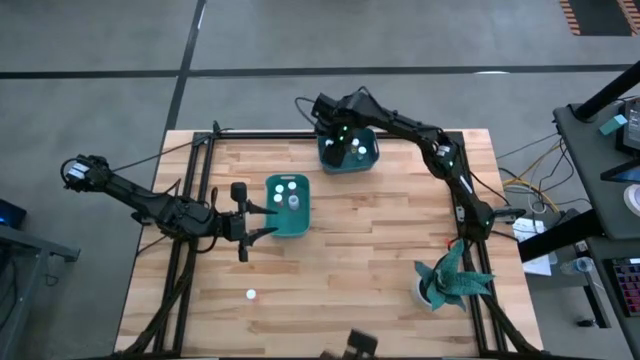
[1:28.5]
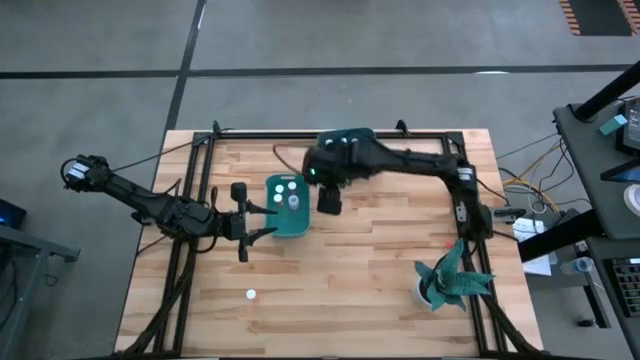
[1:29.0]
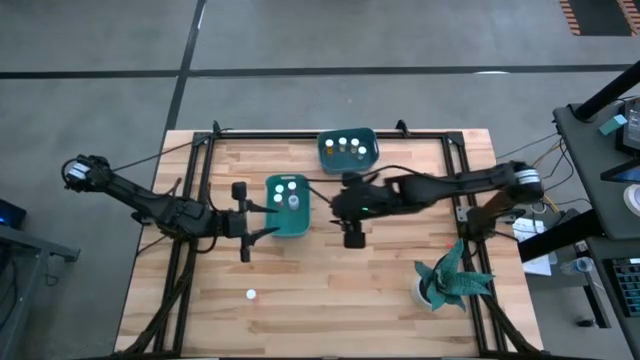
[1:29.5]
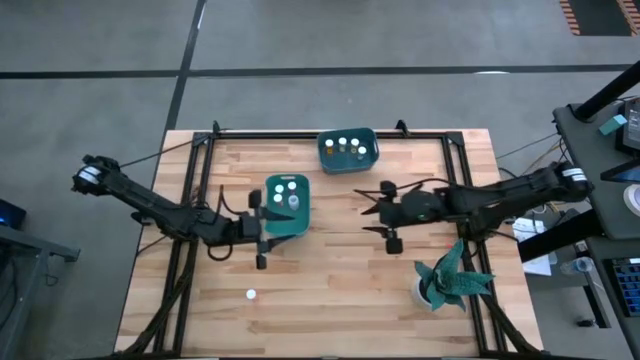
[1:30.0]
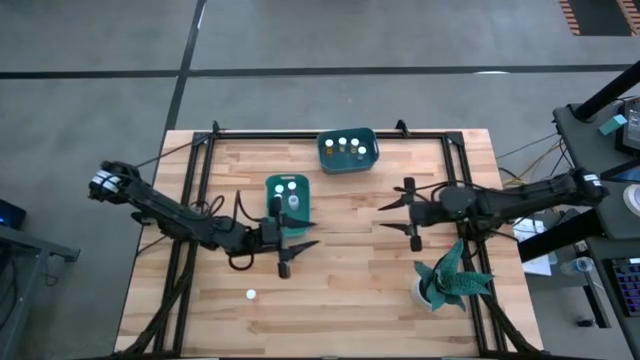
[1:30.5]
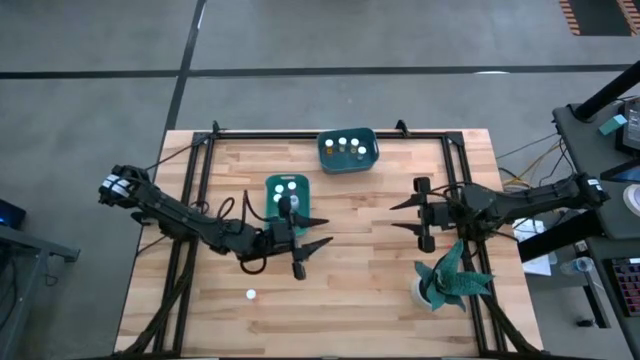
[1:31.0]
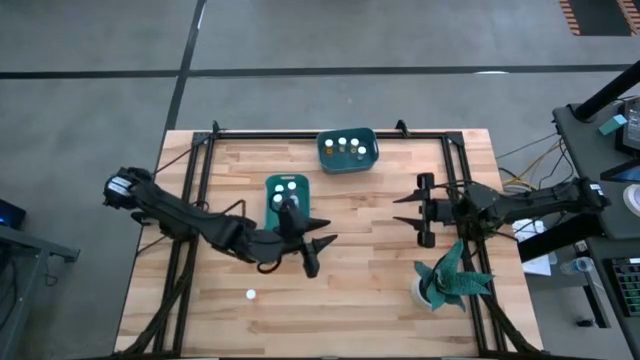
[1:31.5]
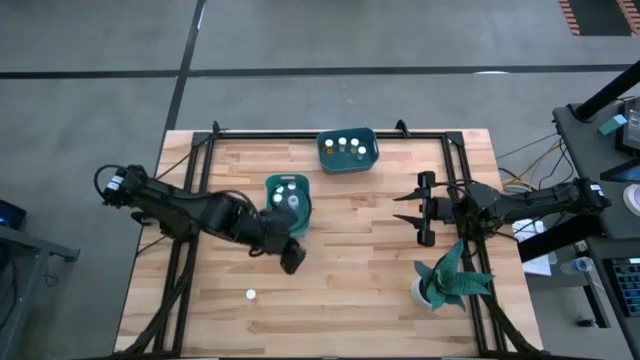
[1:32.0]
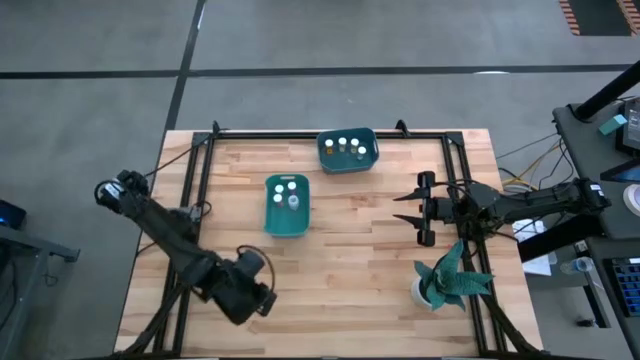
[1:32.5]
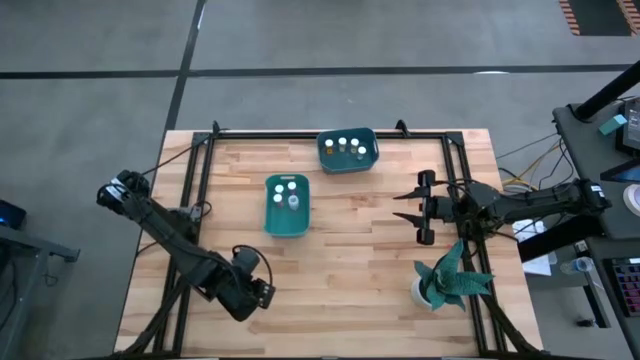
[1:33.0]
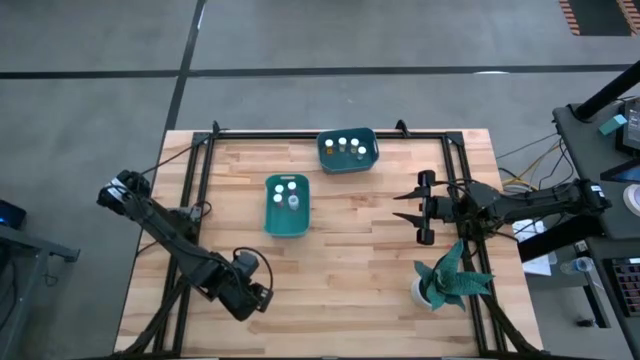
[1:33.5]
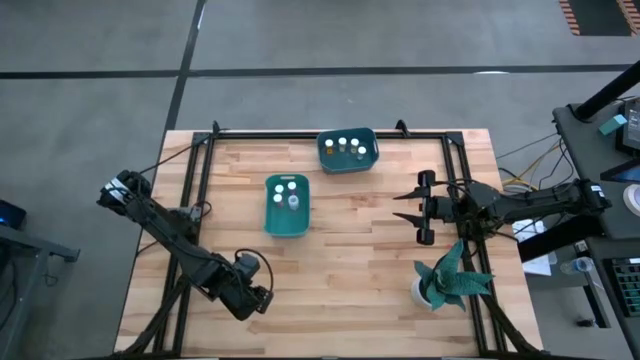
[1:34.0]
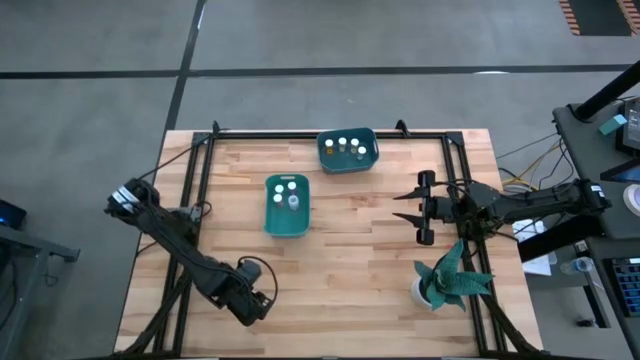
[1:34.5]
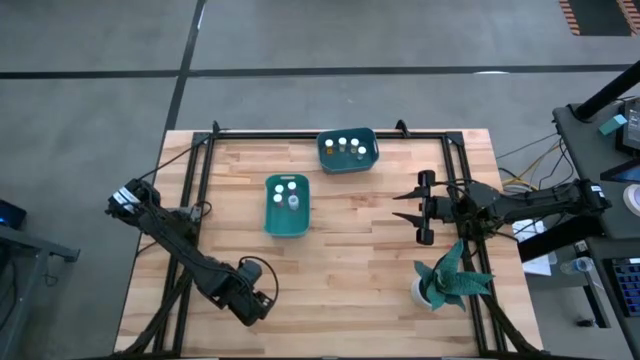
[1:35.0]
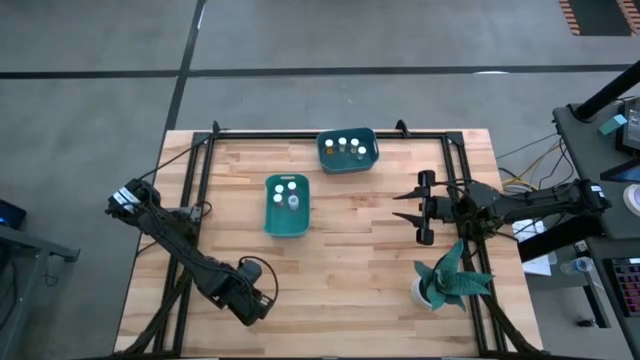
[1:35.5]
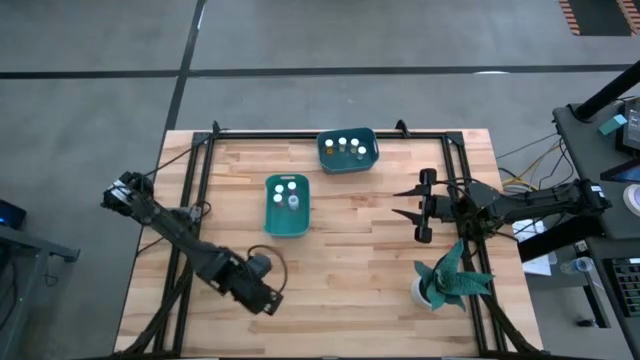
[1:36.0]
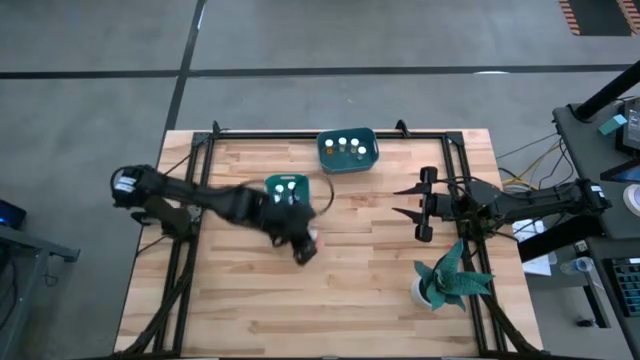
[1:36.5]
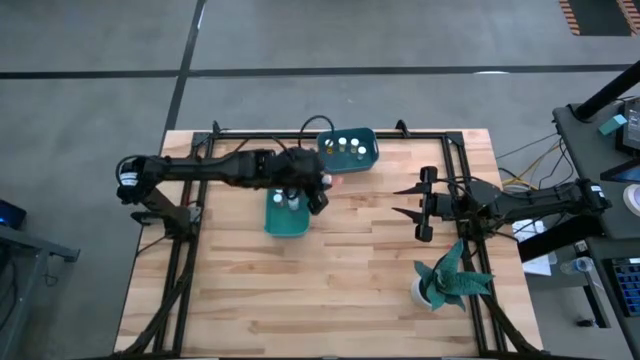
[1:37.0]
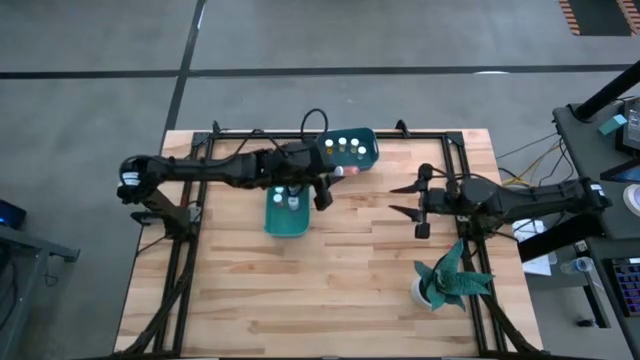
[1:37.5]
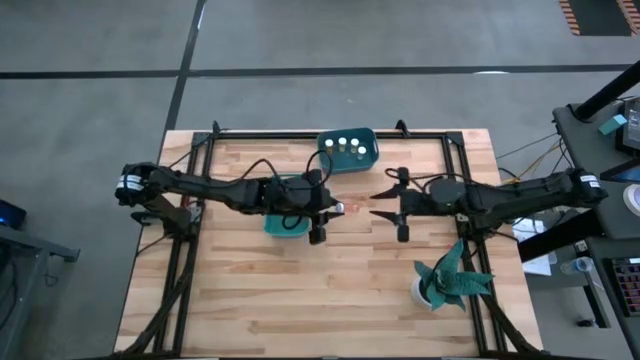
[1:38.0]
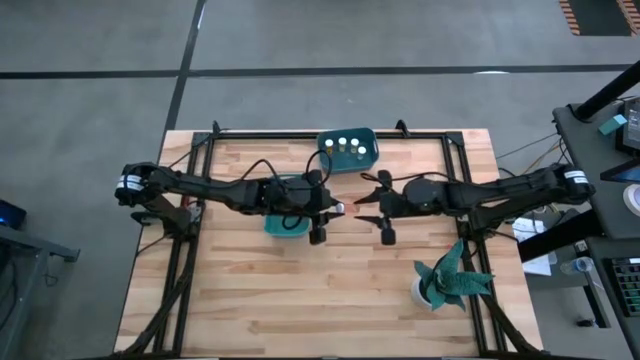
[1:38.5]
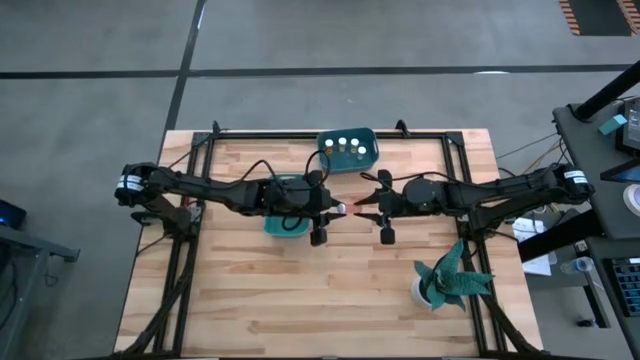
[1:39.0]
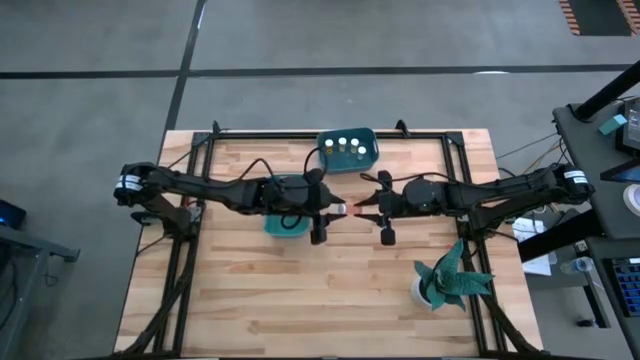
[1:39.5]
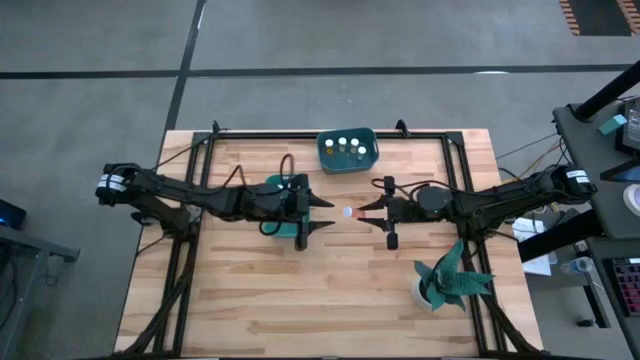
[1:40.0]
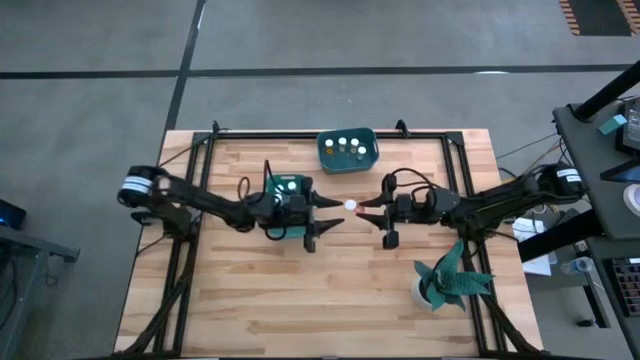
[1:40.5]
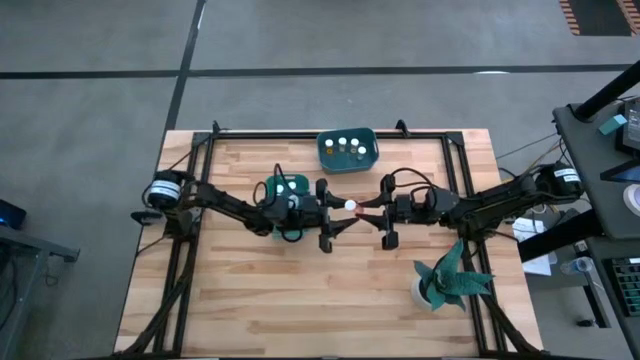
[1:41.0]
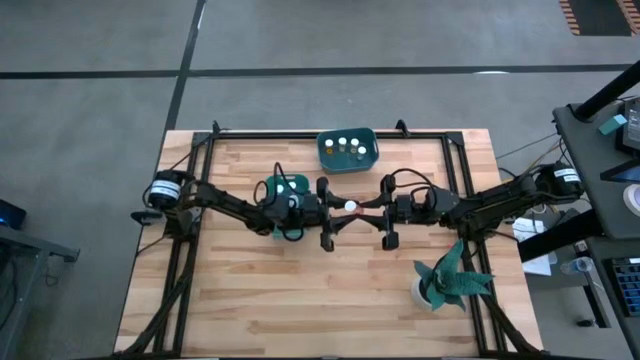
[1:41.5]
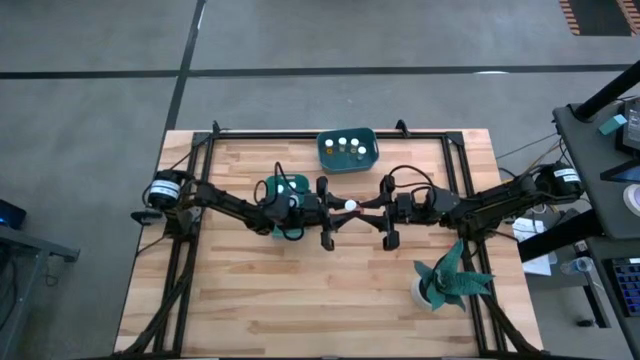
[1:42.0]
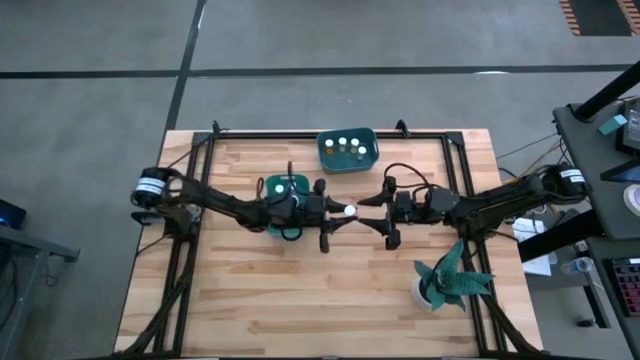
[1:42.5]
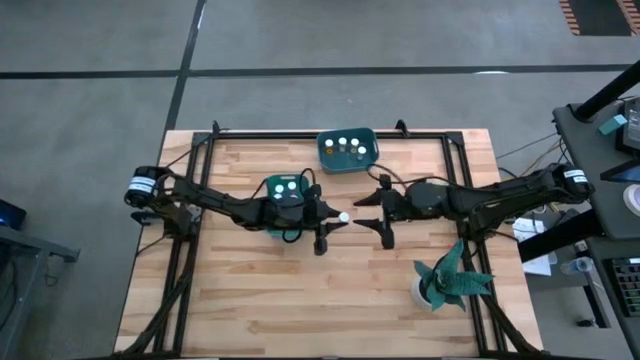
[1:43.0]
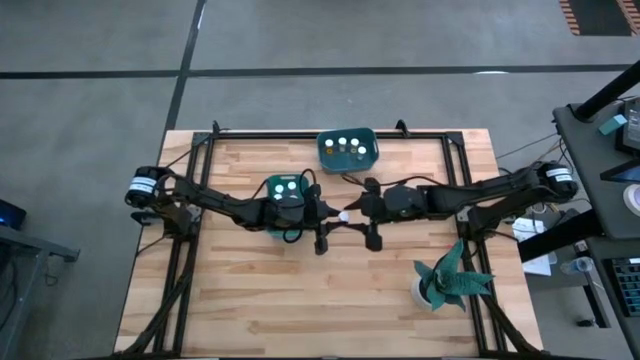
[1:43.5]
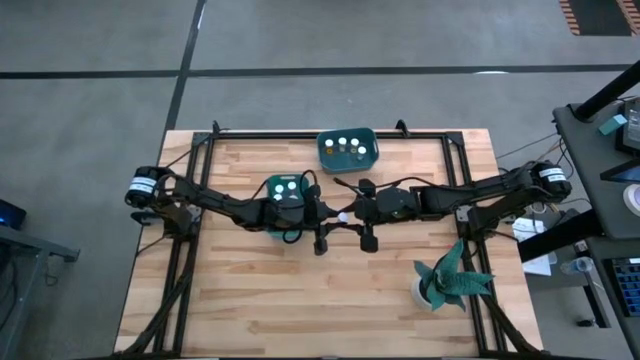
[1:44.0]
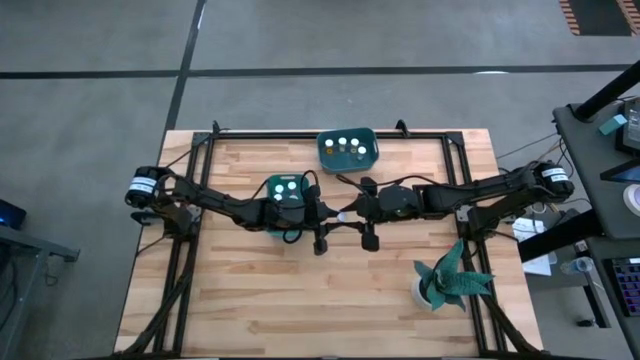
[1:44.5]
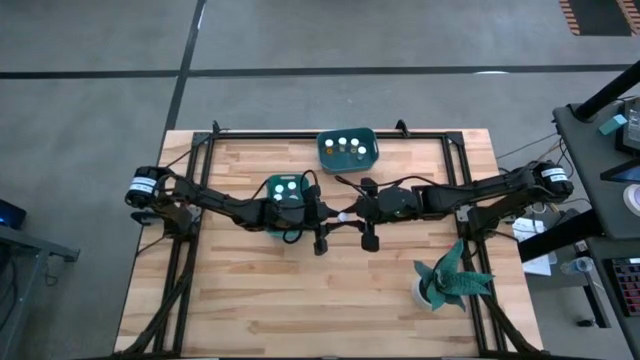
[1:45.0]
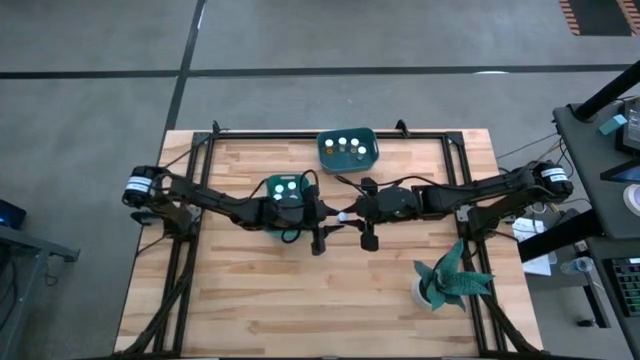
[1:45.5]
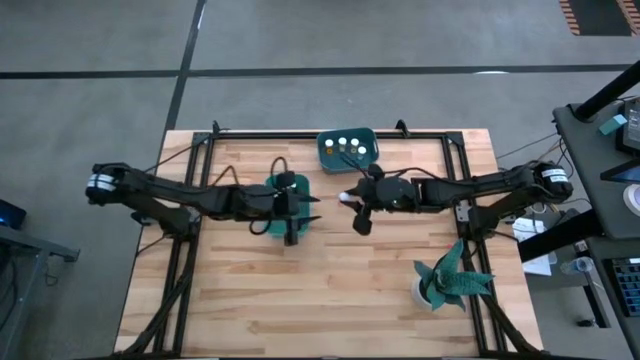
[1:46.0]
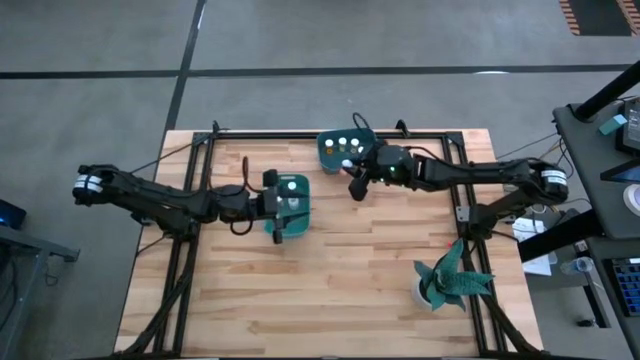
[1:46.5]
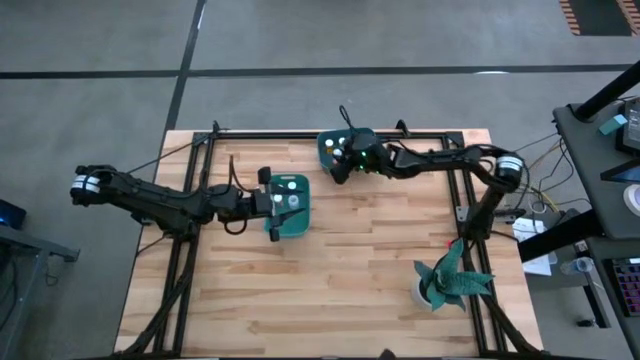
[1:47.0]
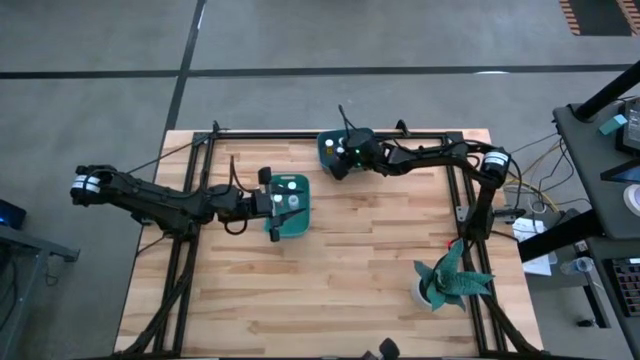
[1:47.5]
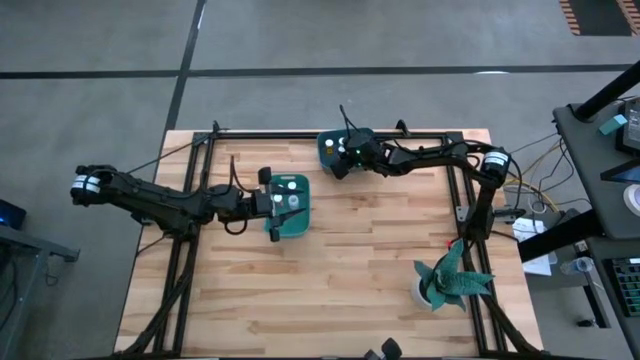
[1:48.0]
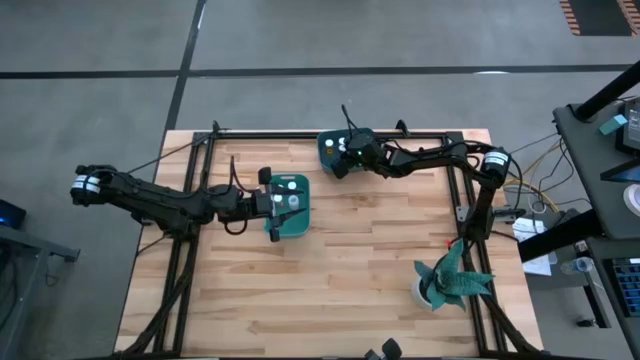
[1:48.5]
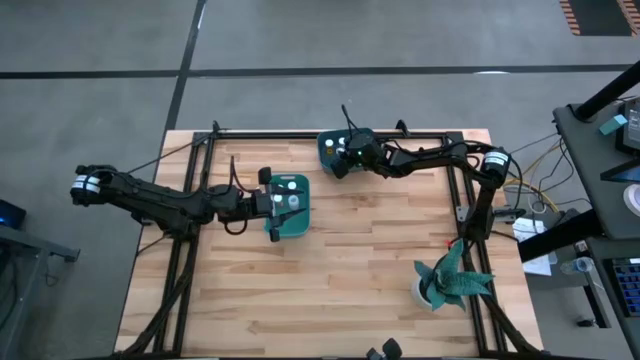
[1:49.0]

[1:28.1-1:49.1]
Task: Pick and place medicine bottles into bin by pill shape (circle, oval)
Put the pink tablet pill bottle into the blue bin
